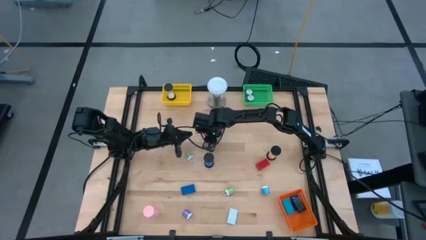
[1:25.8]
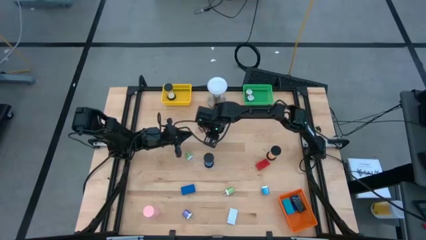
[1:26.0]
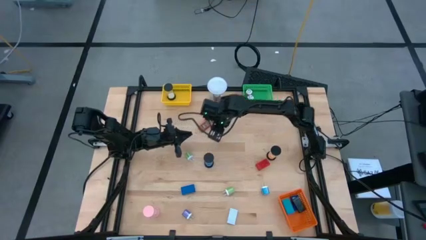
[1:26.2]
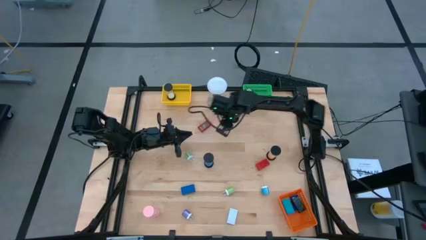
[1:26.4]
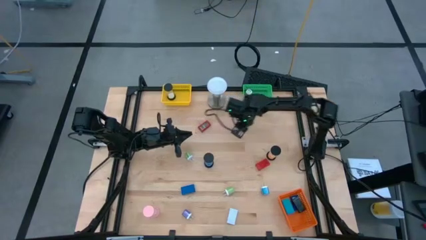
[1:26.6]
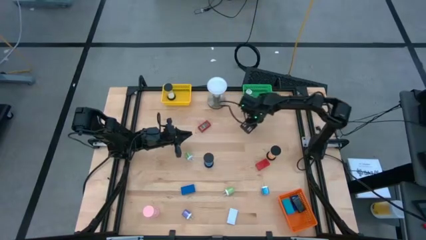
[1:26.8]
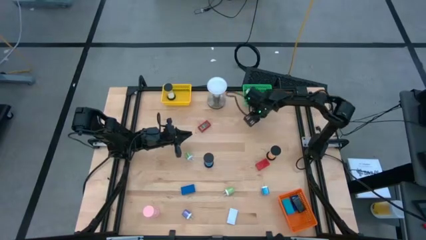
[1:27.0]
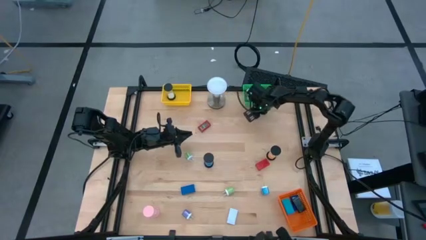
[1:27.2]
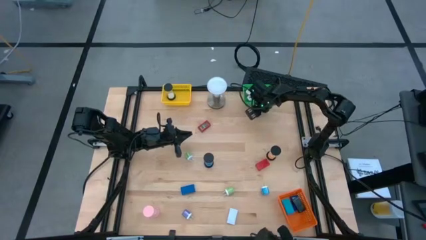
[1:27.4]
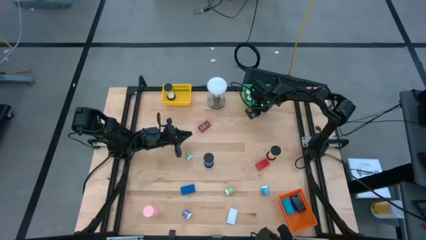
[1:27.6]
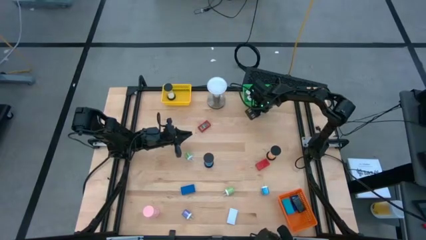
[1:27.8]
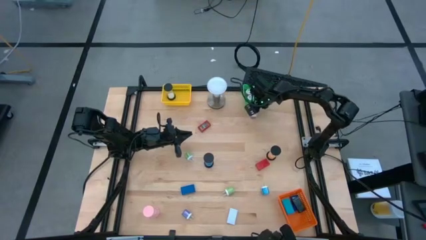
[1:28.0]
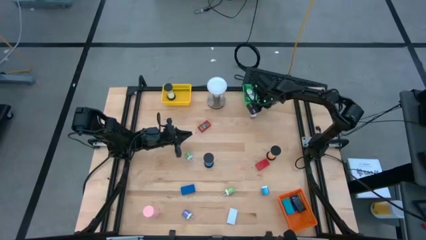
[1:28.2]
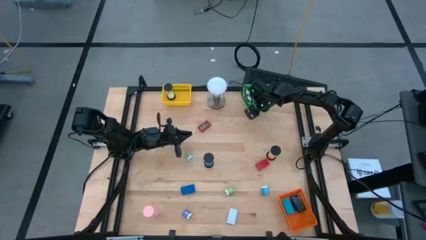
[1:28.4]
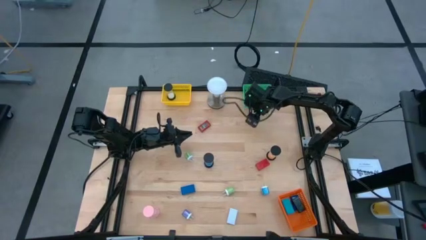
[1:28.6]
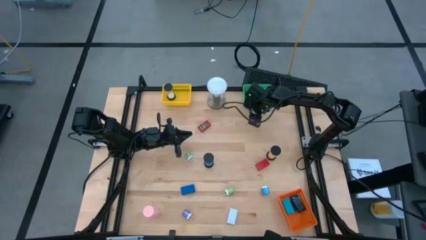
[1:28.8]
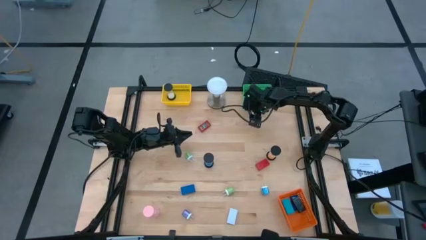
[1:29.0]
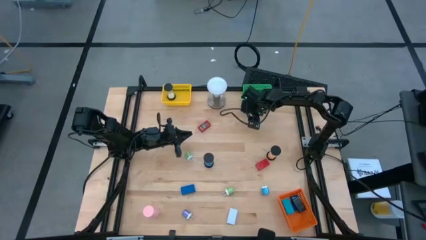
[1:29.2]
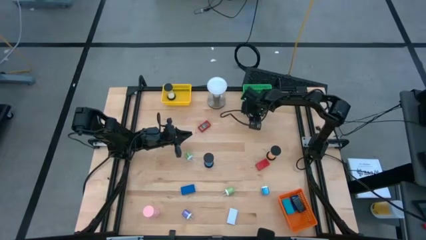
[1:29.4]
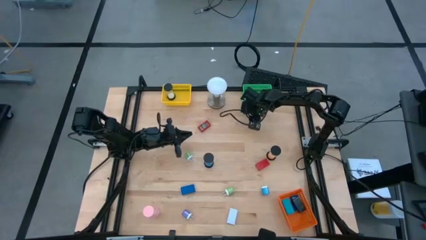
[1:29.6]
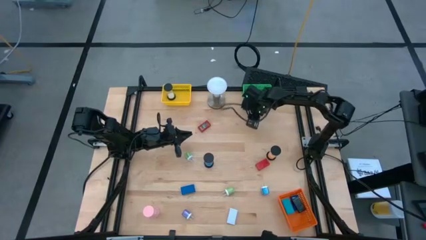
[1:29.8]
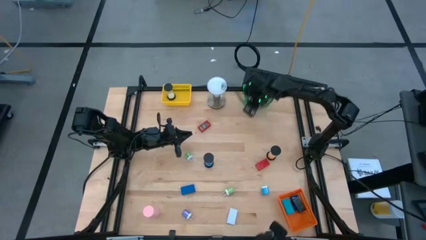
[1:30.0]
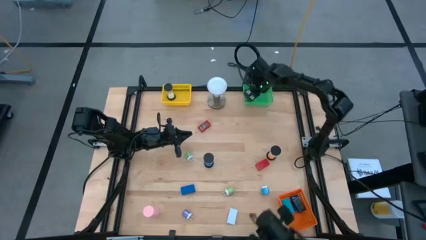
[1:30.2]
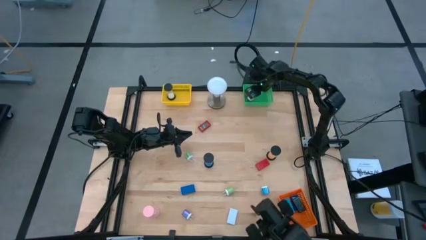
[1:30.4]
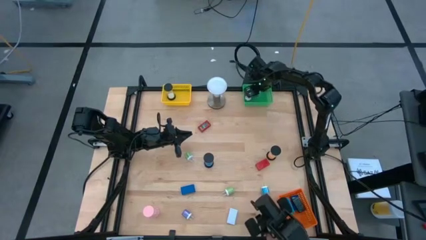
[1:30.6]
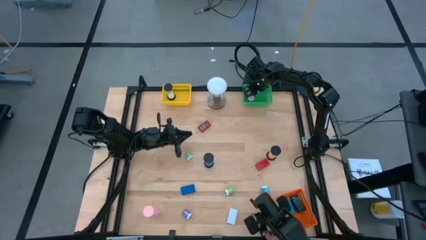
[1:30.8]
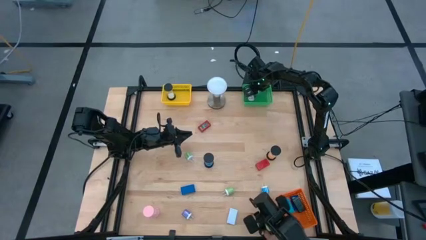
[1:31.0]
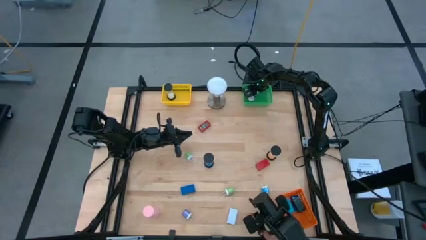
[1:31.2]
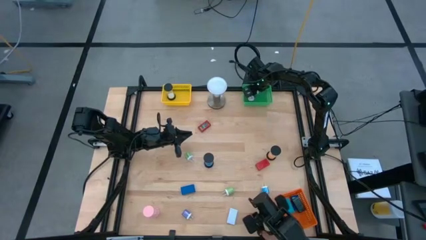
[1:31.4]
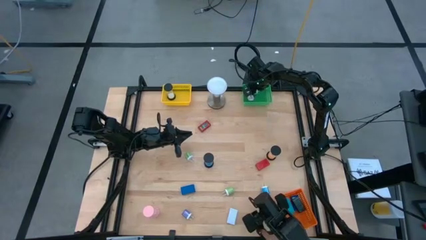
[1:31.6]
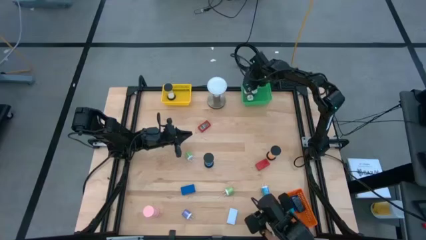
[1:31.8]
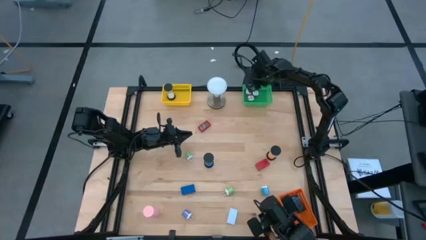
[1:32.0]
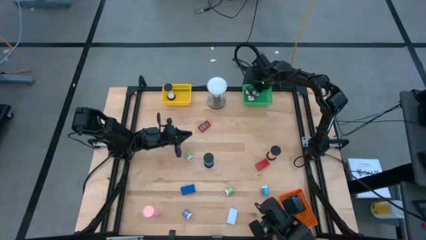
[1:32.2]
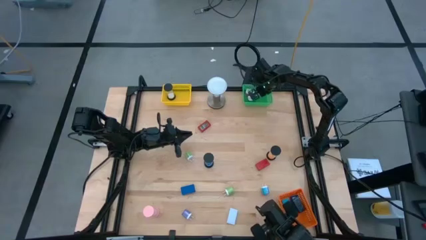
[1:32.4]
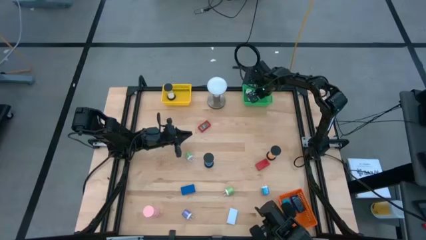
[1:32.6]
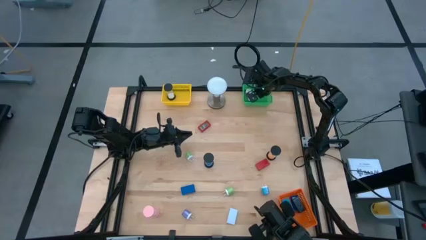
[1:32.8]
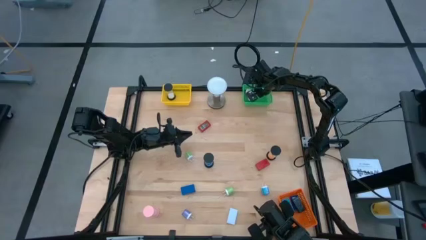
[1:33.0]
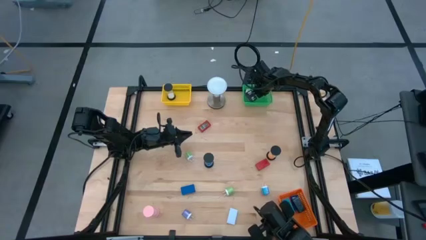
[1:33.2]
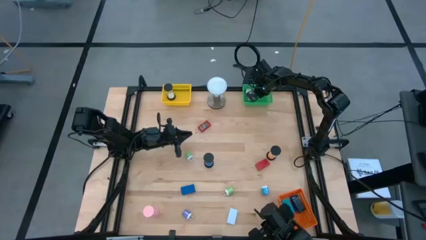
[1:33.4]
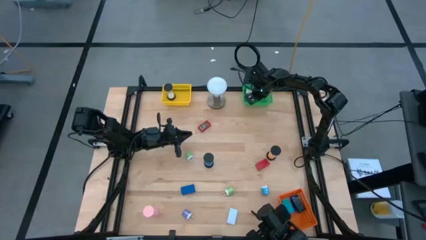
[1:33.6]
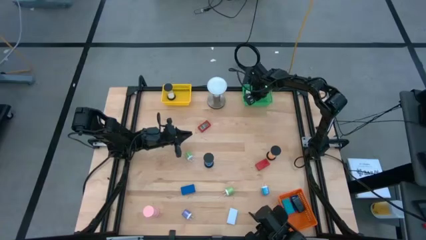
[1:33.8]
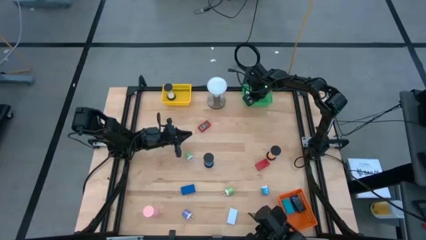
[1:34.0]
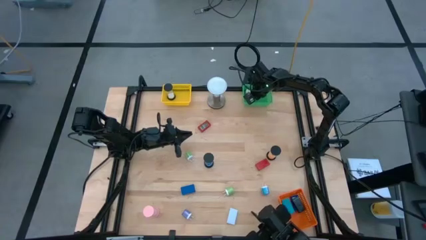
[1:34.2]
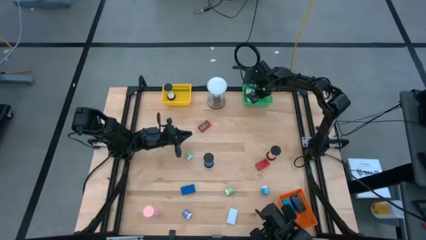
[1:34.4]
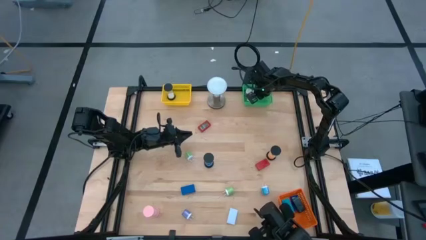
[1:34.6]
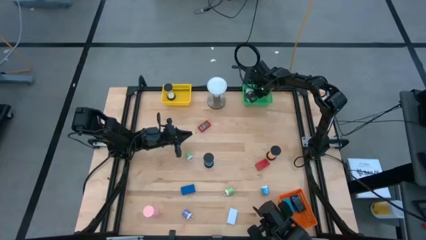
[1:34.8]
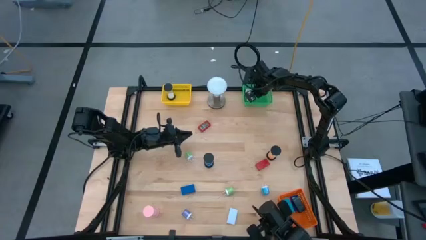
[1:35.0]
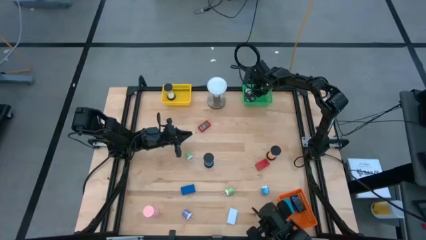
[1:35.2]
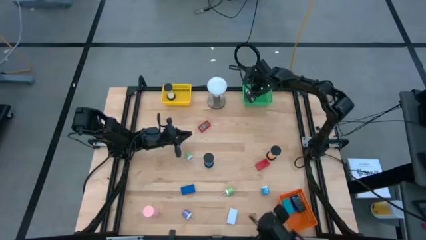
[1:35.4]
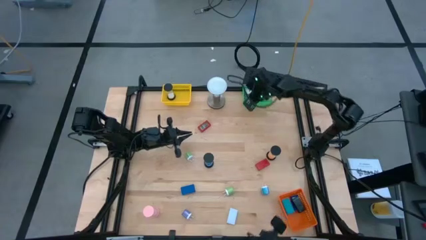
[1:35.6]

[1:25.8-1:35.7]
Task: Pick & Place Office items
Put the top purple charger adapter into the green bin

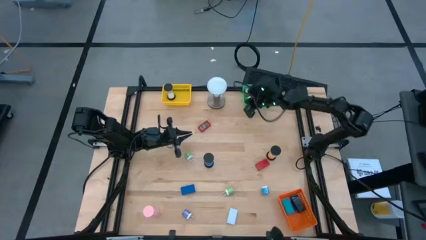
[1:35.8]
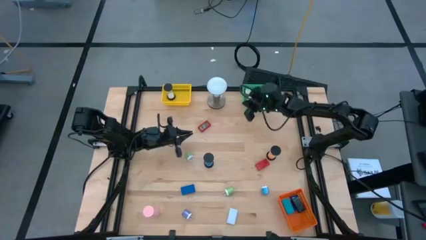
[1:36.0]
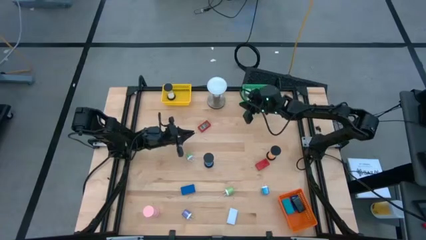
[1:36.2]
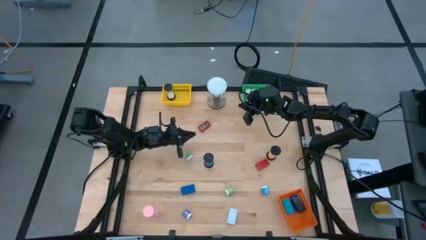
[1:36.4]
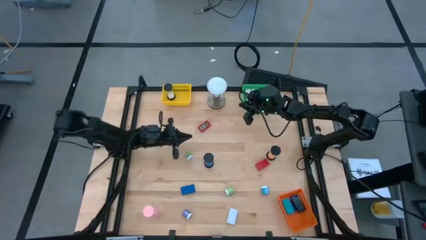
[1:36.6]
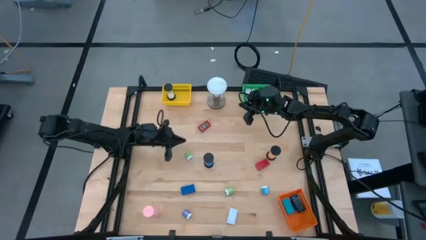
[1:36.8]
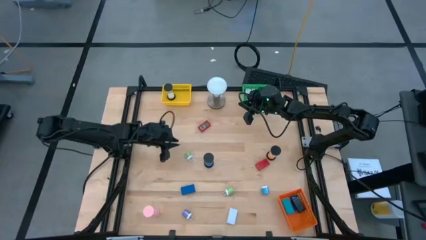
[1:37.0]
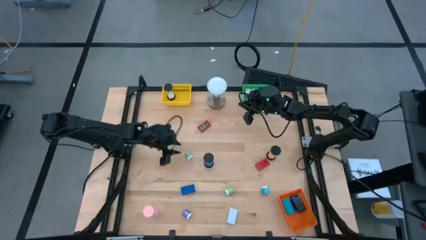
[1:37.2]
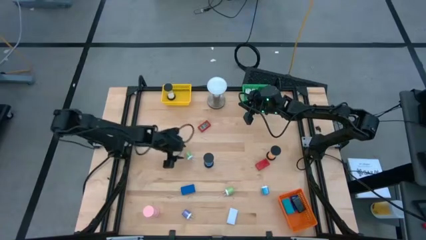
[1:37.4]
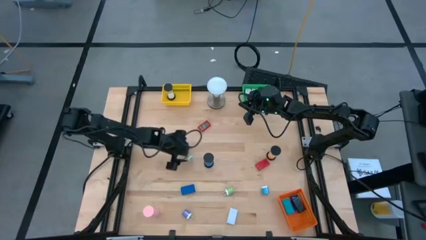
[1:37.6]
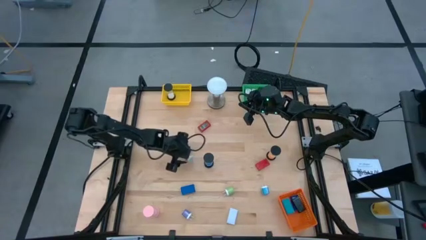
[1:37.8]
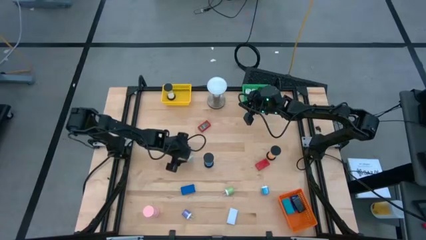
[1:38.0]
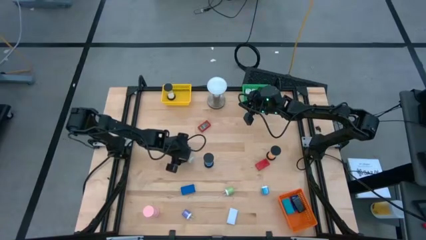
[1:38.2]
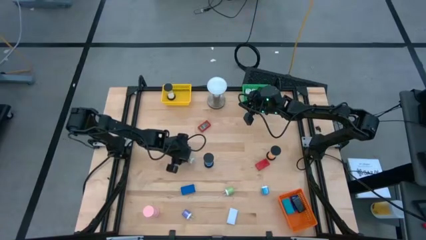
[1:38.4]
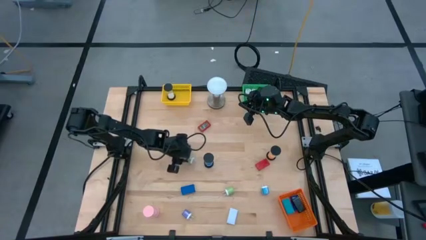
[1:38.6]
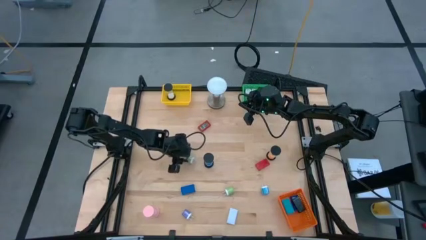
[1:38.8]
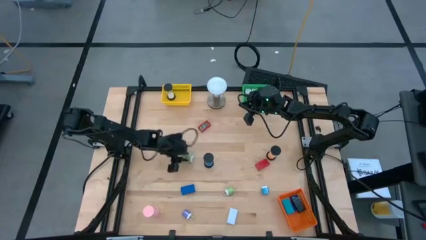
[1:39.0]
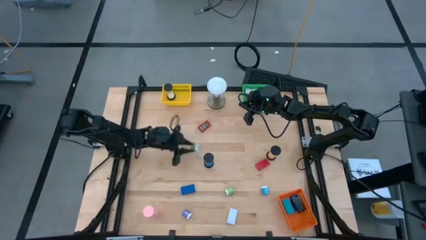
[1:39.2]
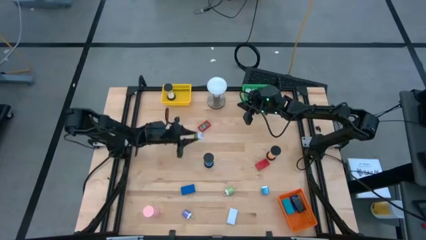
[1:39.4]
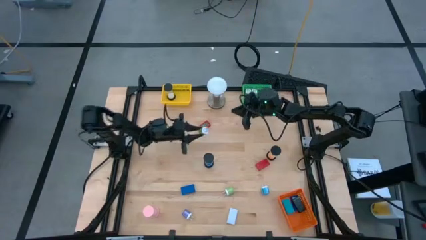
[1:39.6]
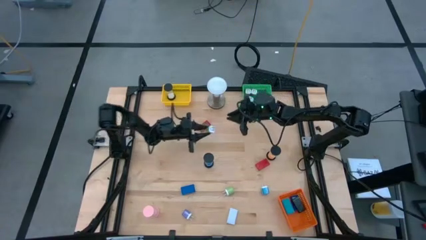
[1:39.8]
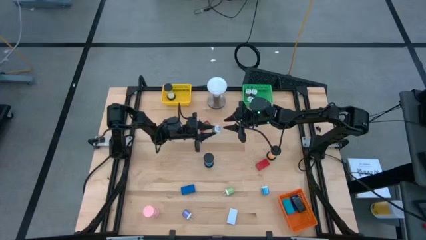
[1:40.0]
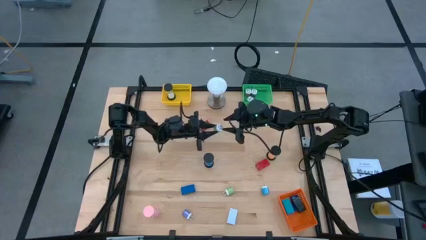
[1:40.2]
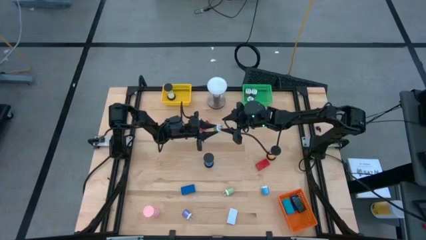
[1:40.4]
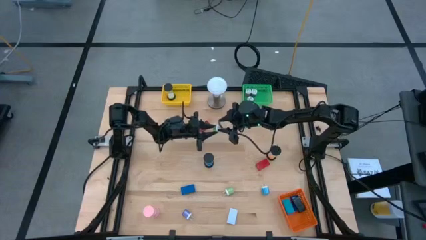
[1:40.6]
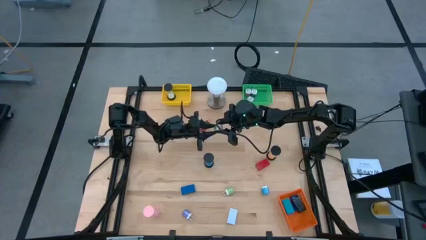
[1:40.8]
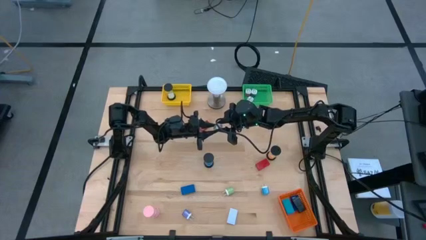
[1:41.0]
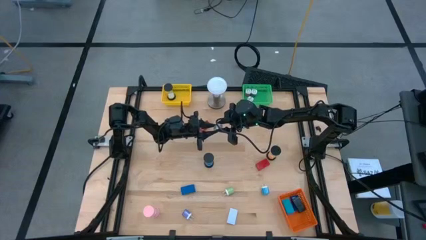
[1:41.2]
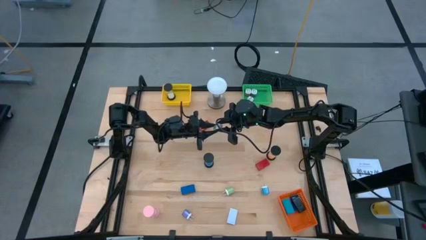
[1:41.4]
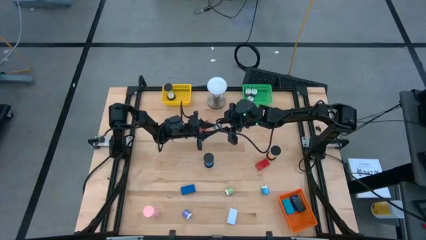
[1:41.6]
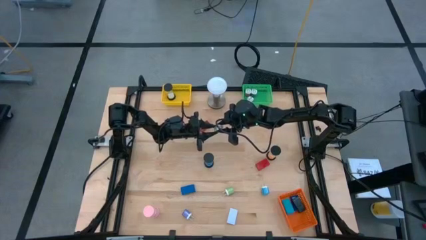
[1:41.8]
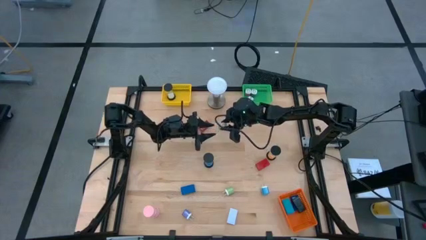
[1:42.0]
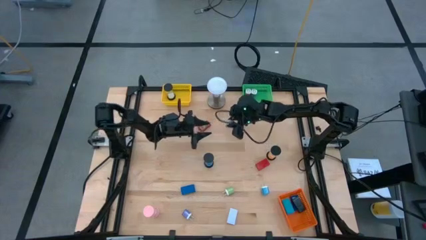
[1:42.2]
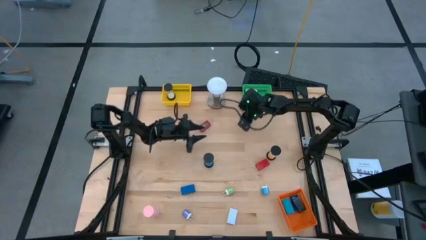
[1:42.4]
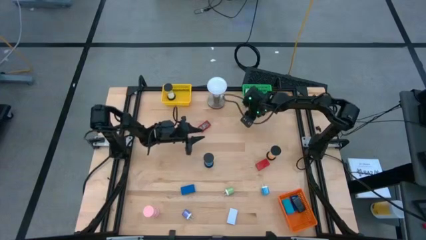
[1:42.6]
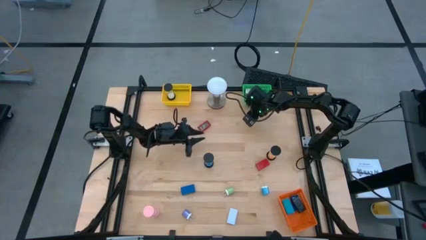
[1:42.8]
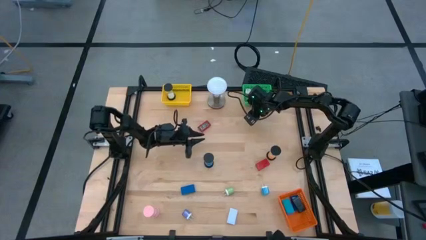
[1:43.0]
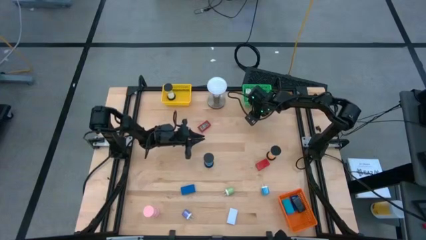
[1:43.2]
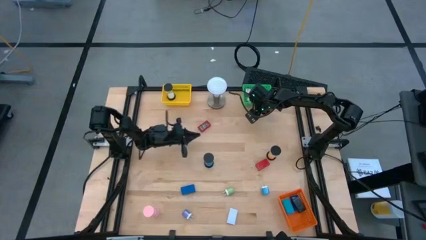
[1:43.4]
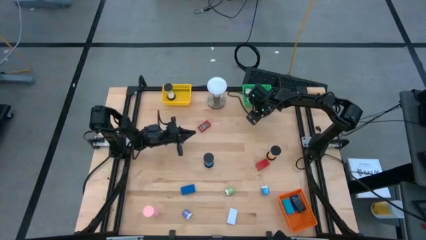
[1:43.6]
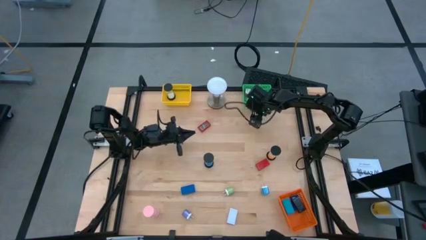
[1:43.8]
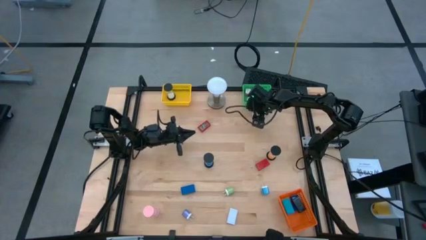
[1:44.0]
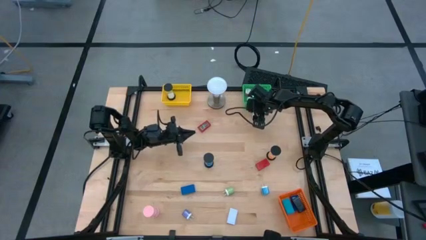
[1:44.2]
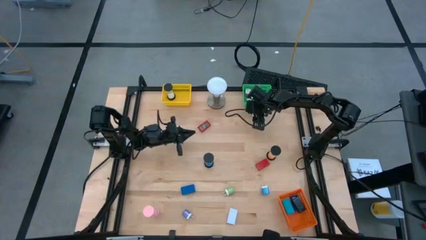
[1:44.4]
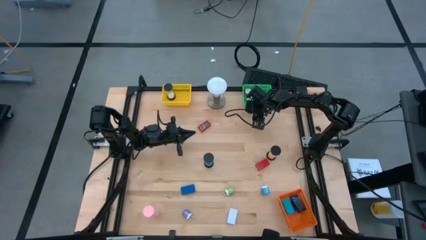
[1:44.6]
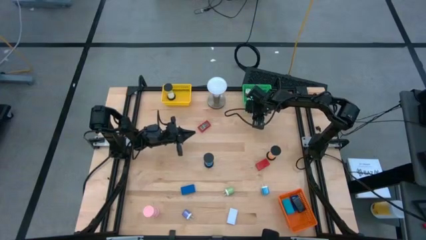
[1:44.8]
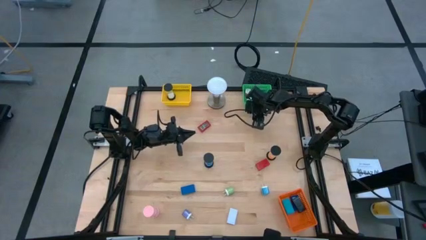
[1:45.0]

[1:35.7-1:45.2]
Put the top green charger adapter into the green bin
